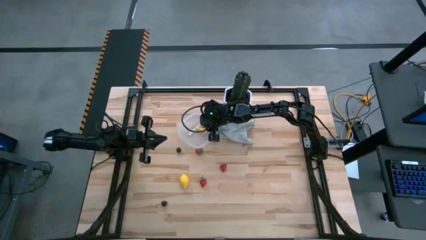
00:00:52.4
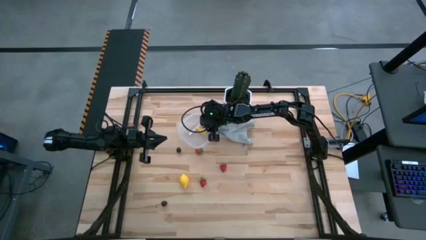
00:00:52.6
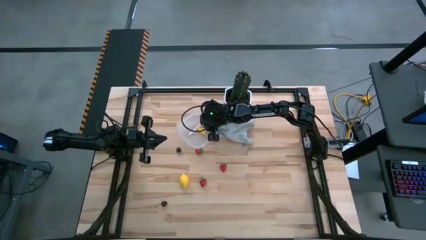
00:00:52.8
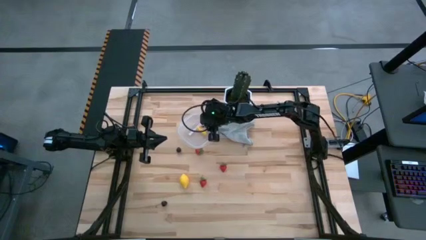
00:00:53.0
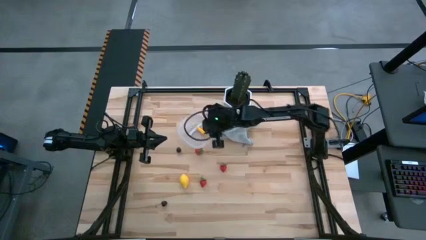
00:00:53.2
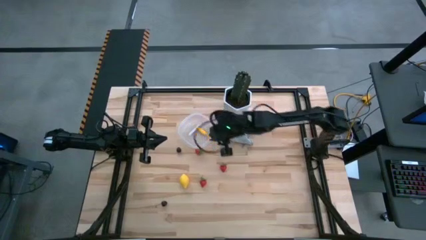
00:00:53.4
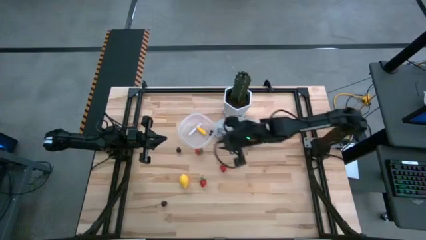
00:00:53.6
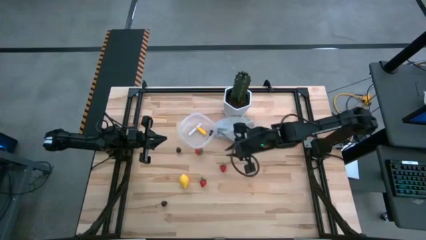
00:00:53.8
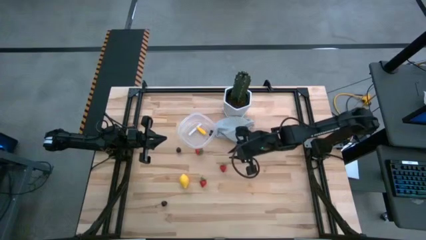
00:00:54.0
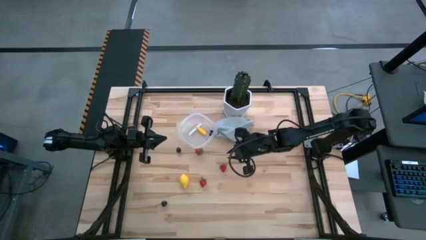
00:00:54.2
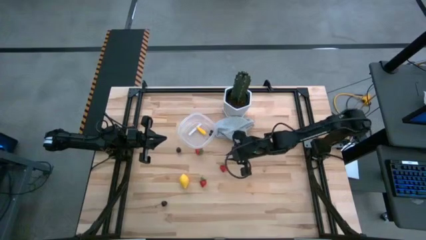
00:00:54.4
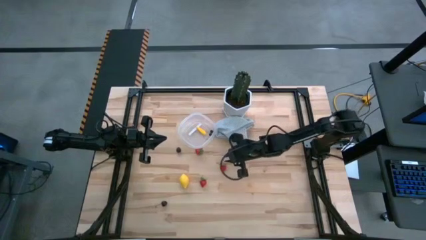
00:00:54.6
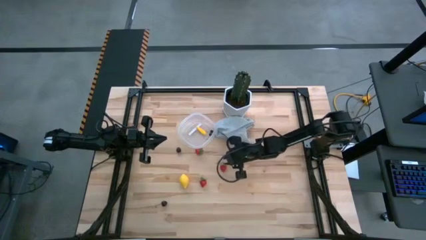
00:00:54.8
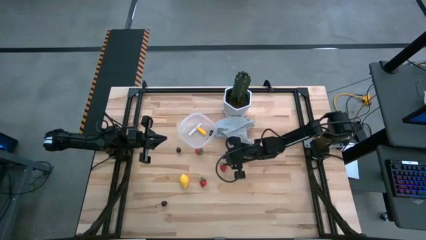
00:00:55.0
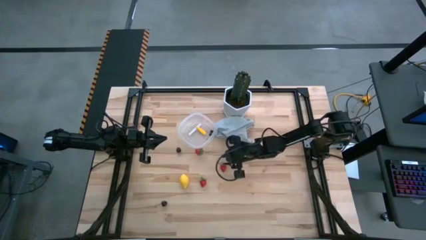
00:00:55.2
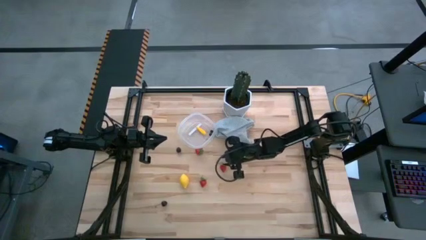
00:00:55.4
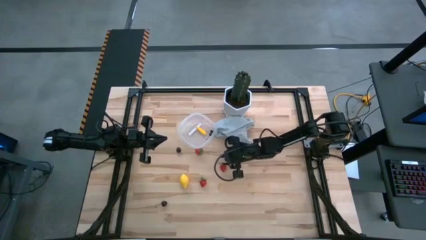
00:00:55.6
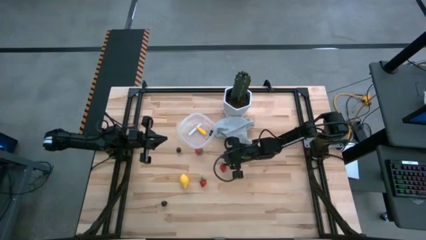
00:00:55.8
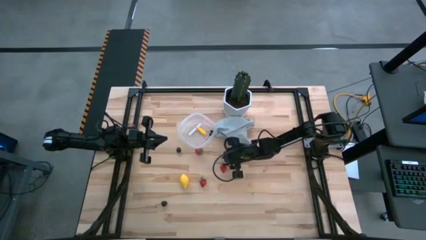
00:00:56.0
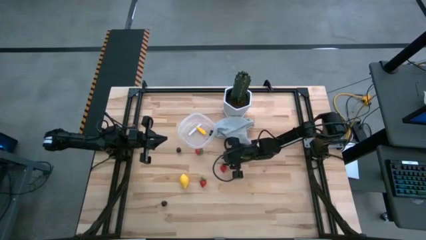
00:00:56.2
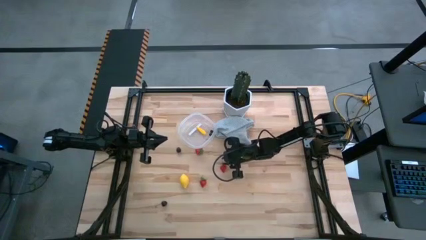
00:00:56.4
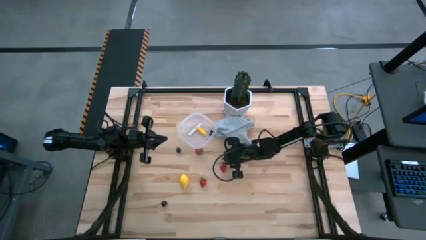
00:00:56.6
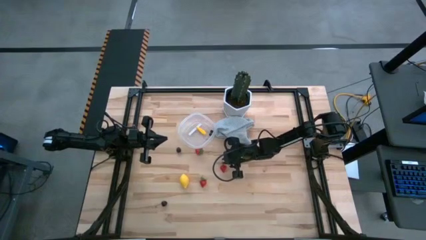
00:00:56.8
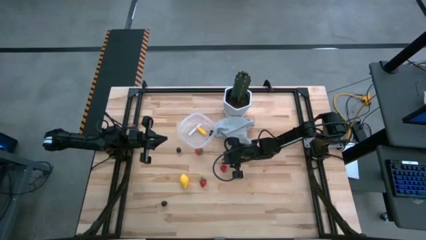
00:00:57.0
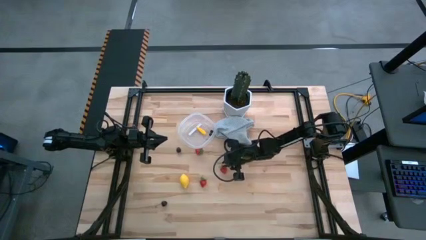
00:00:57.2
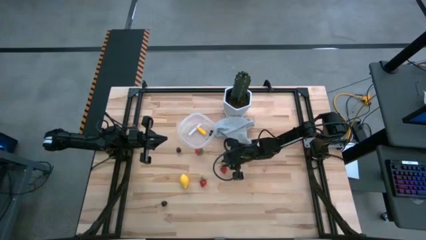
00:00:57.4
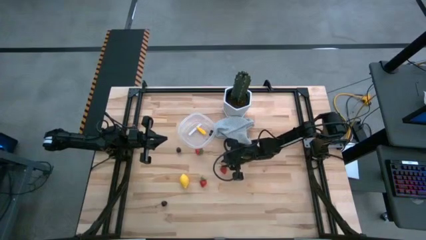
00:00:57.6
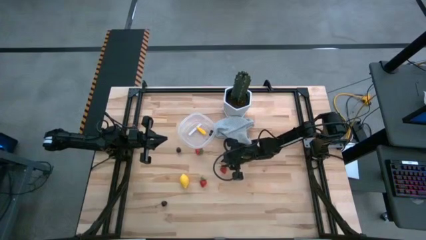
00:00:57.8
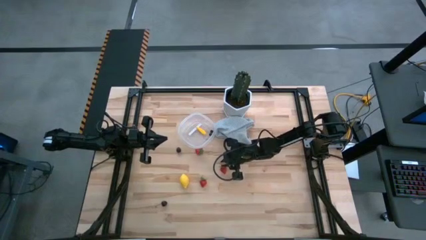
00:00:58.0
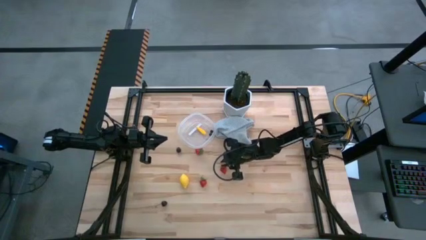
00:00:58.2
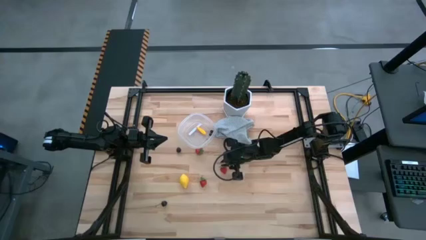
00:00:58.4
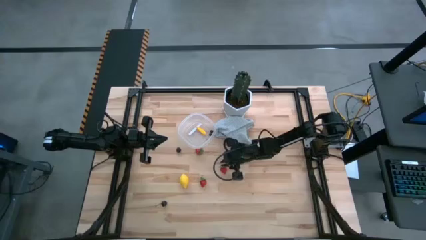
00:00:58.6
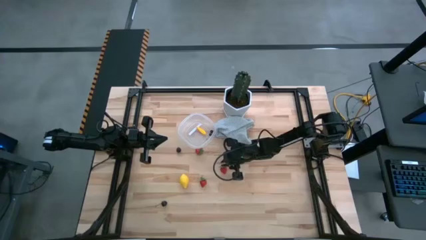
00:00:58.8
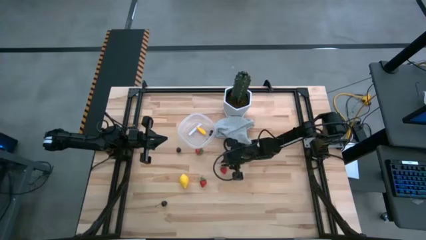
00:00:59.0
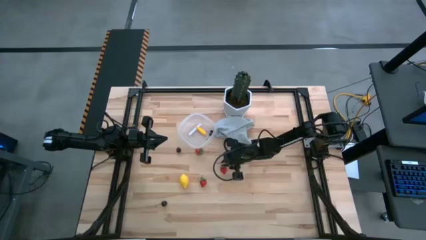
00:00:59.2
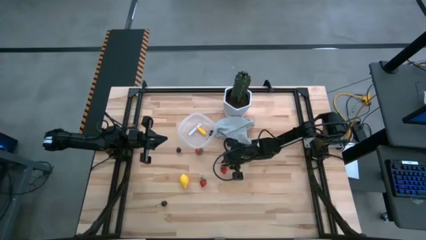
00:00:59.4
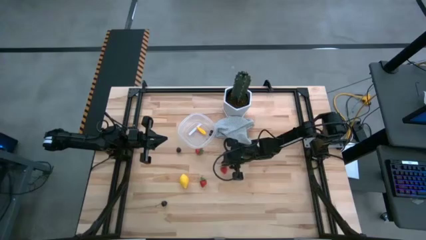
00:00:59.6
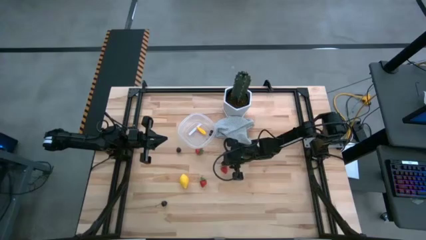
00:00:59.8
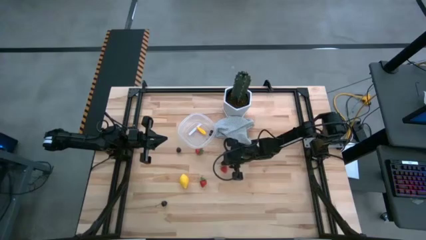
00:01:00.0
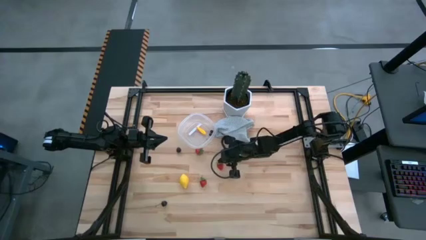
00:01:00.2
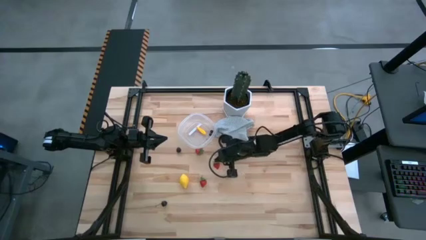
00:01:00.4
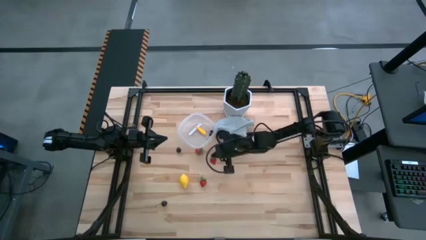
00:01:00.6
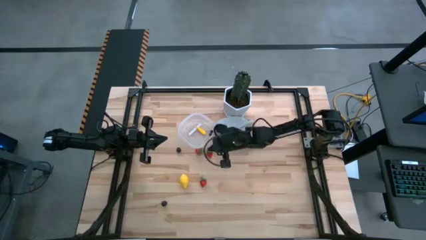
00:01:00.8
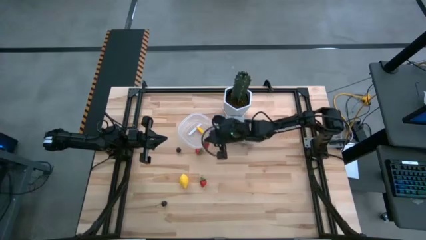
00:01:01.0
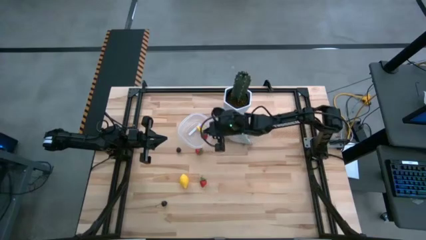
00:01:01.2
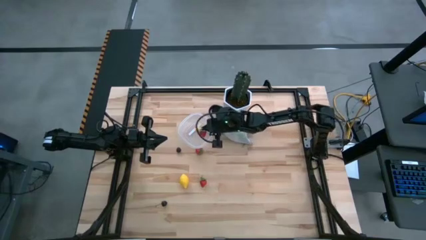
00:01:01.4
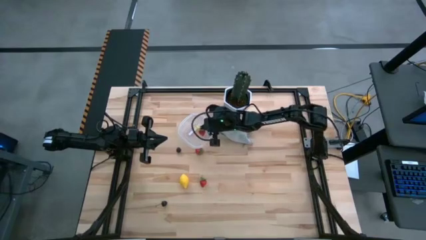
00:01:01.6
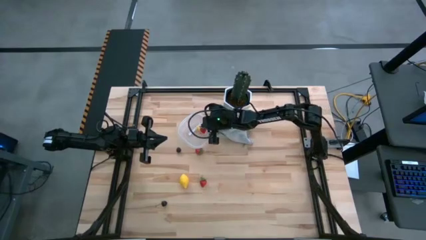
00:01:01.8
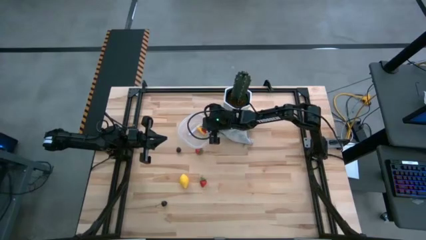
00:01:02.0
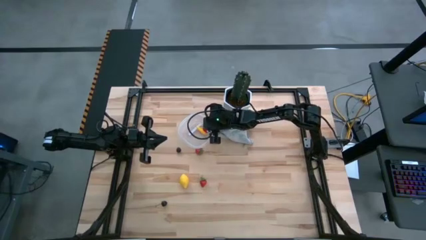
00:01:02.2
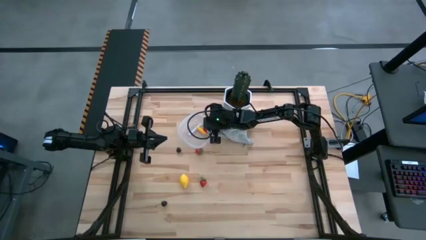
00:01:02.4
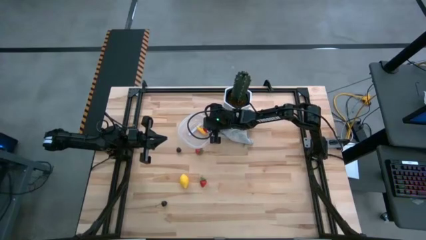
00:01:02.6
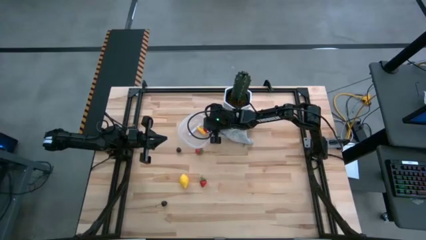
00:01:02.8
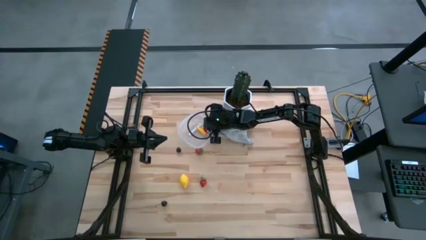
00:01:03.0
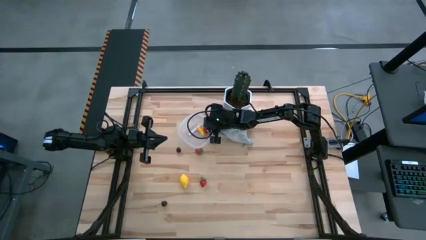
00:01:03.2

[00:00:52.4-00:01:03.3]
Task: Pick and placing Produce into tupperware
Put the middle strawberry into the transparent bin
